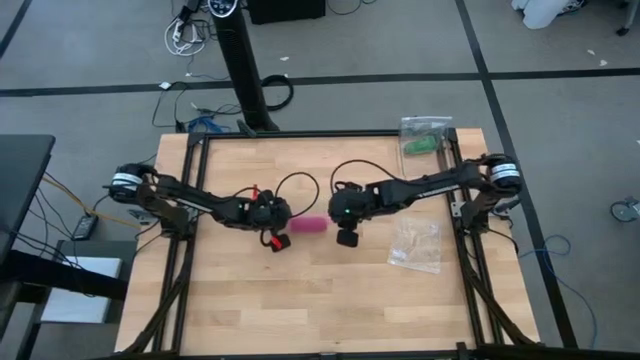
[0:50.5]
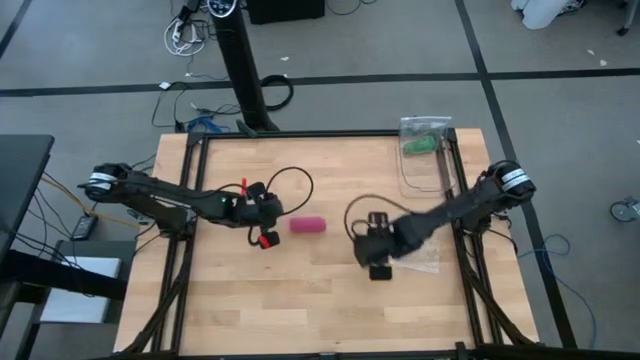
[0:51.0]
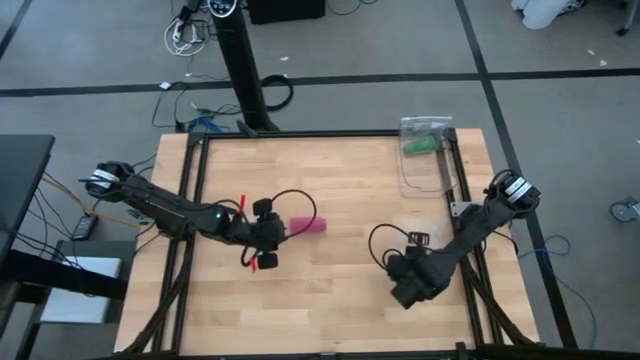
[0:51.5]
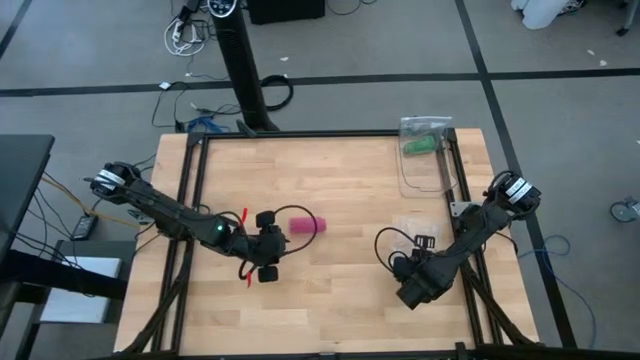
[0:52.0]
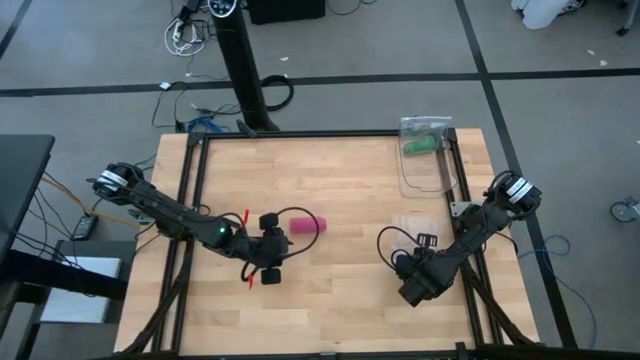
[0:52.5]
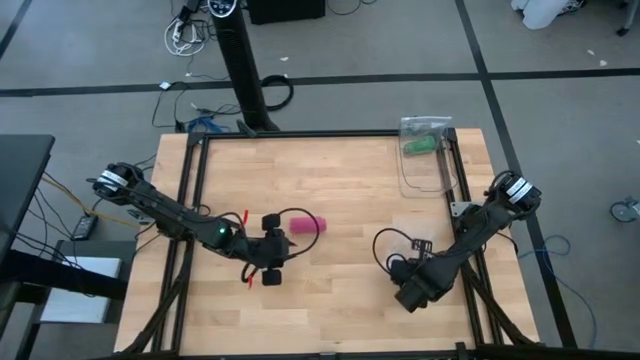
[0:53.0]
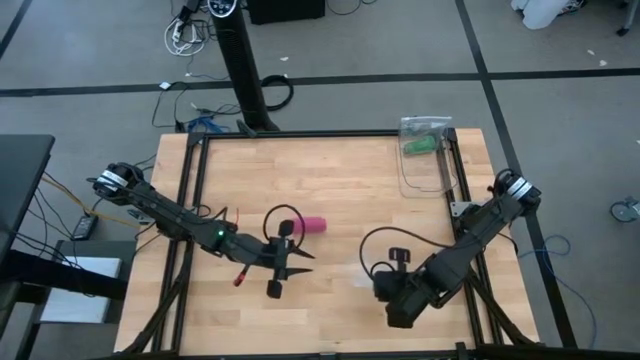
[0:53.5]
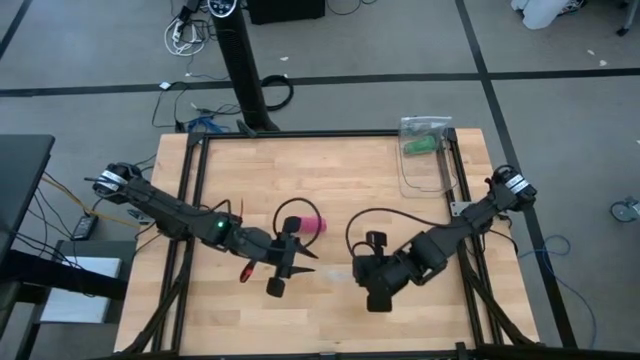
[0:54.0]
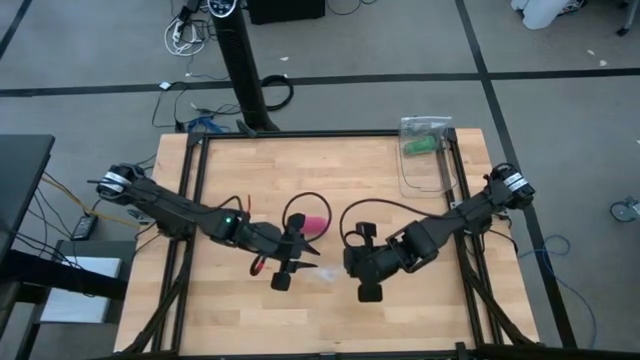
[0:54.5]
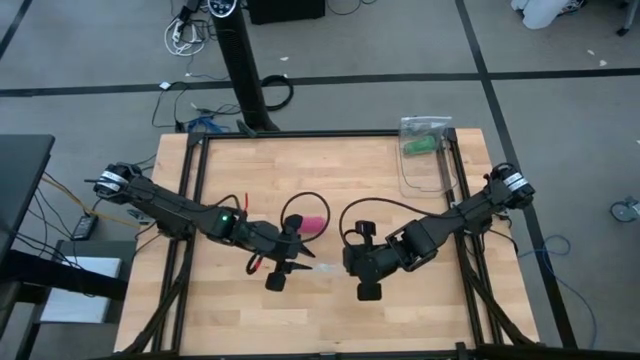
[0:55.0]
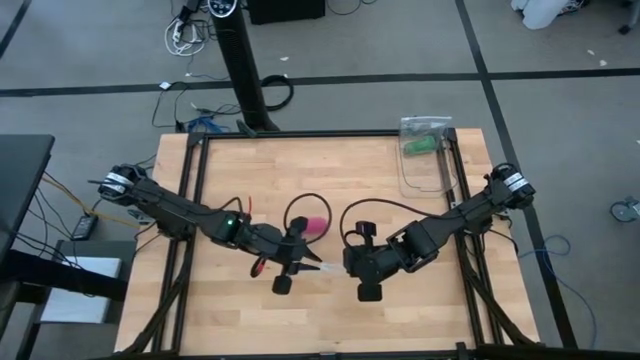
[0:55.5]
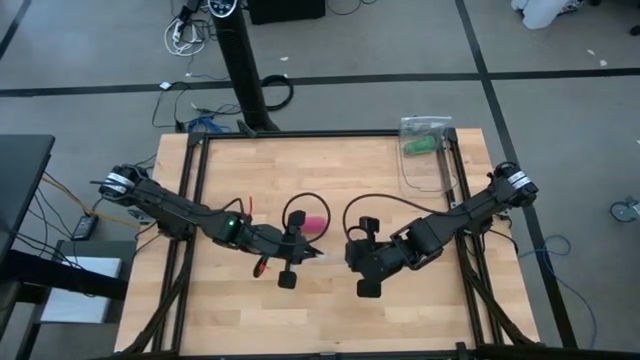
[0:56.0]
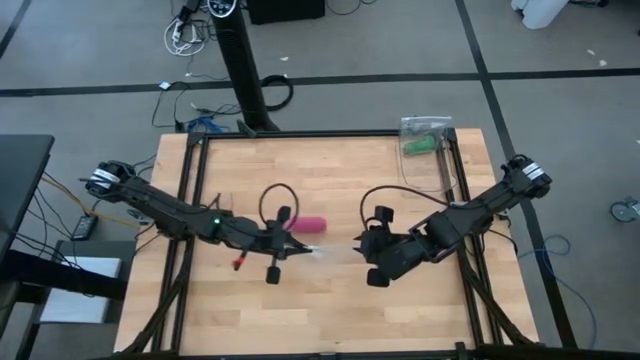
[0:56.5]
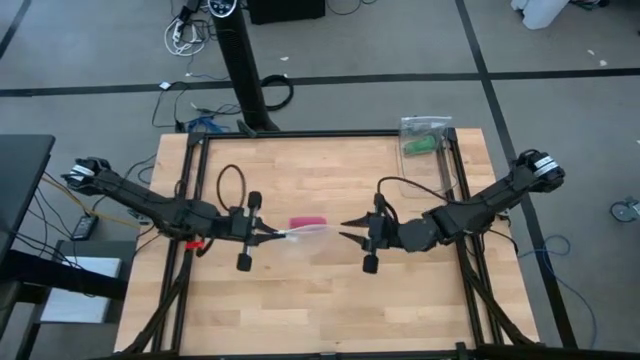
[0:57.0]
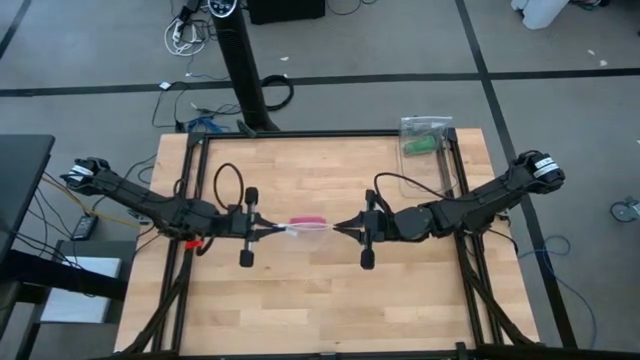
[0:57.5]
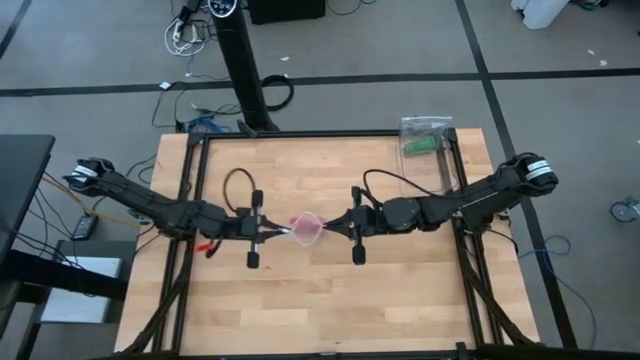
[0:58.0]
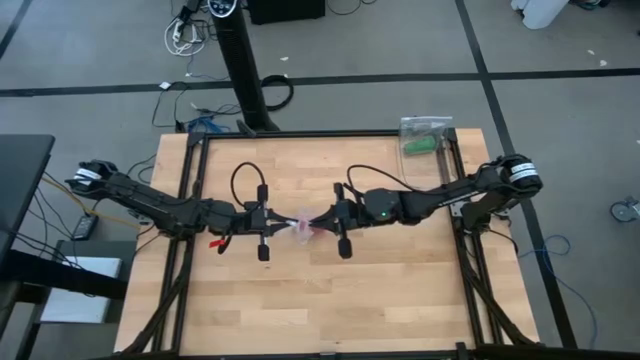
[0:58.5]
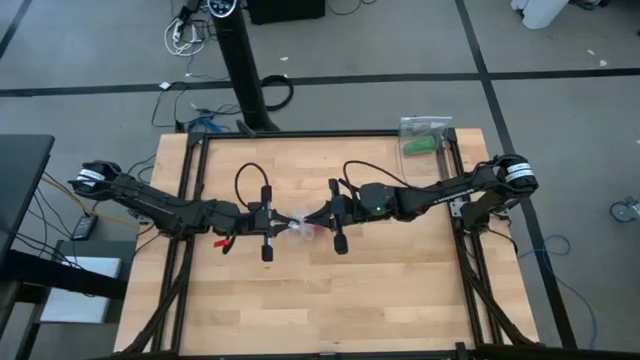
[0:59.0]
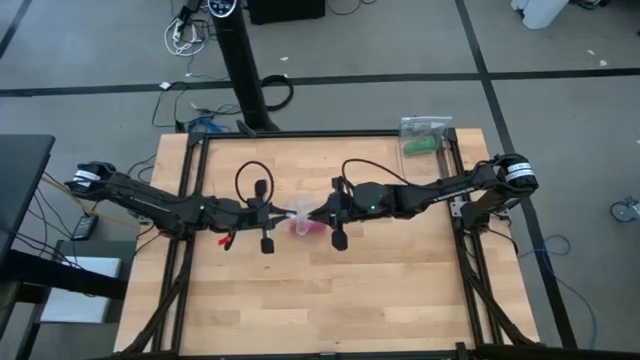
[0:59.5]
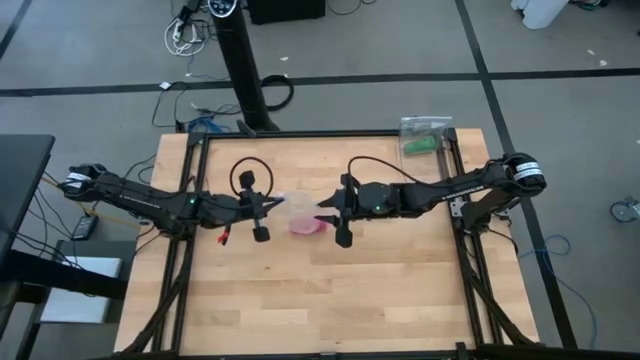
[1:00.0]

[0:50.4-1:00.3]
Task: Roll bandage
Prepare the transparent zip bag

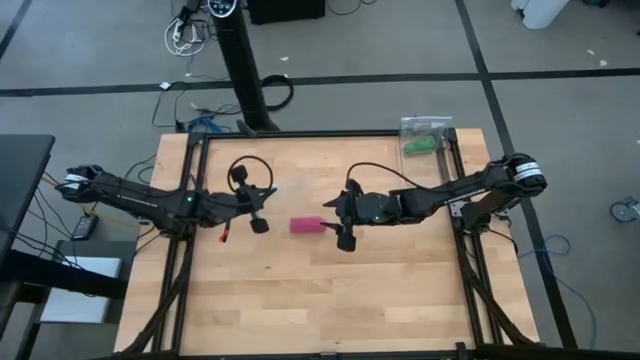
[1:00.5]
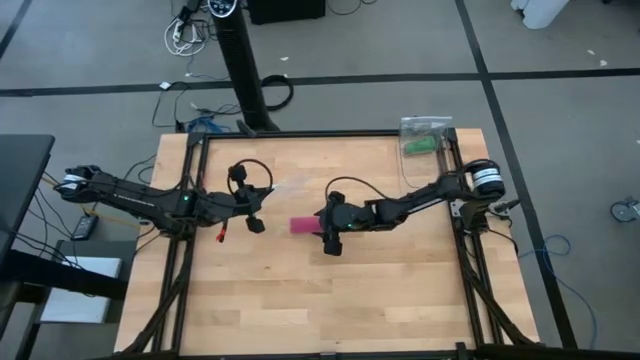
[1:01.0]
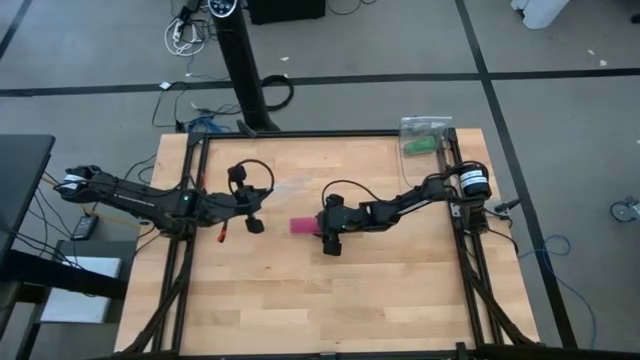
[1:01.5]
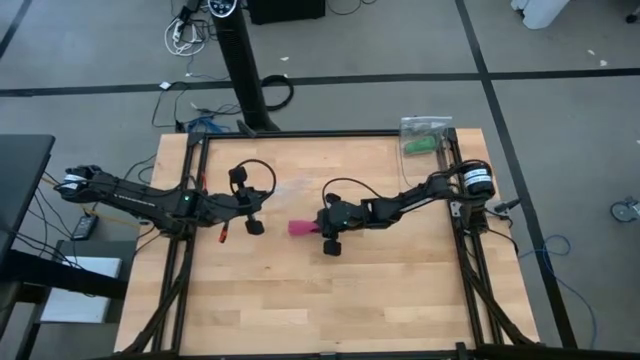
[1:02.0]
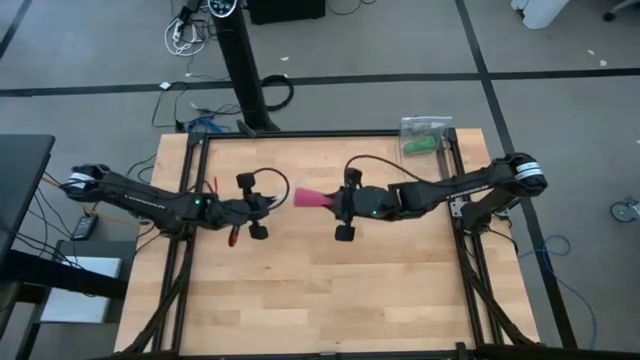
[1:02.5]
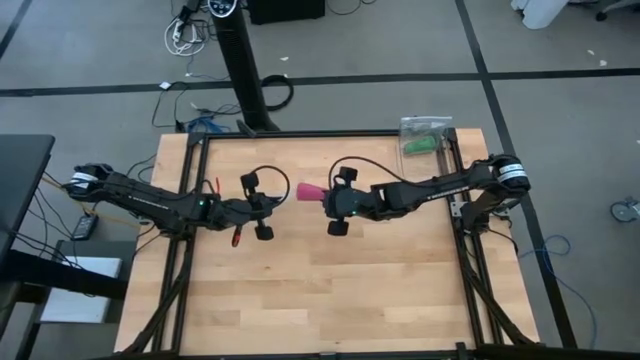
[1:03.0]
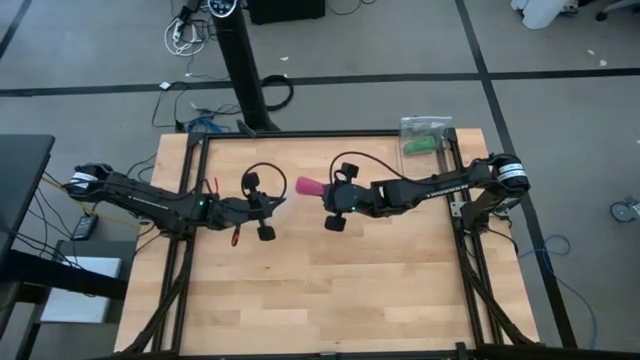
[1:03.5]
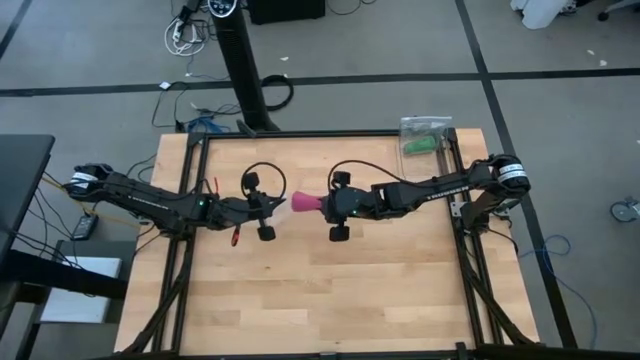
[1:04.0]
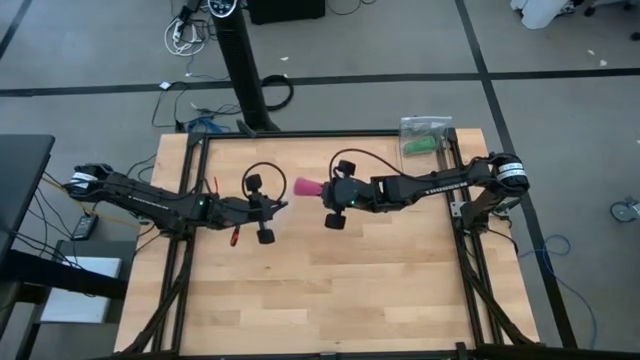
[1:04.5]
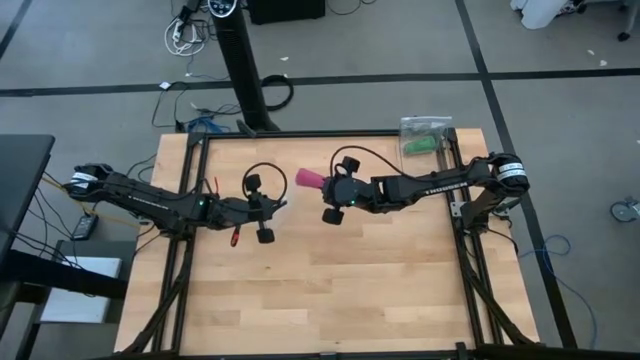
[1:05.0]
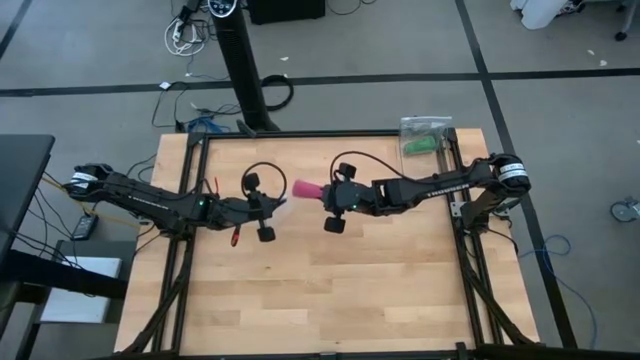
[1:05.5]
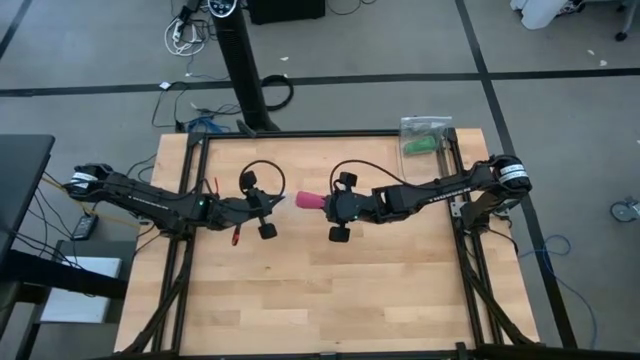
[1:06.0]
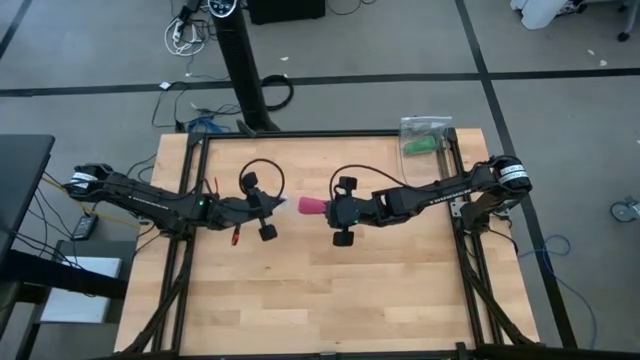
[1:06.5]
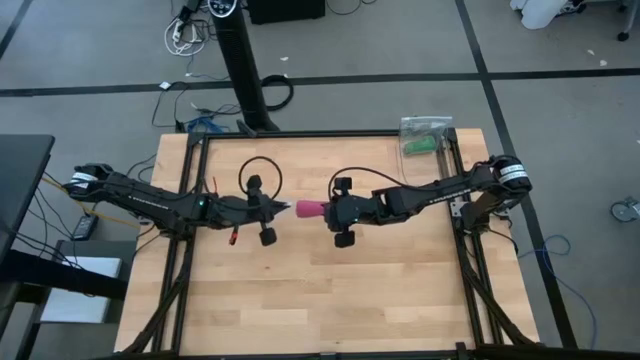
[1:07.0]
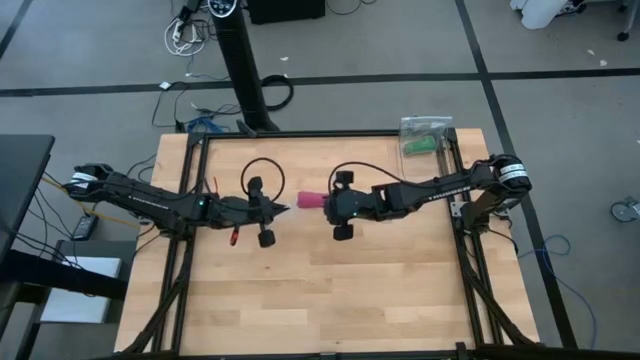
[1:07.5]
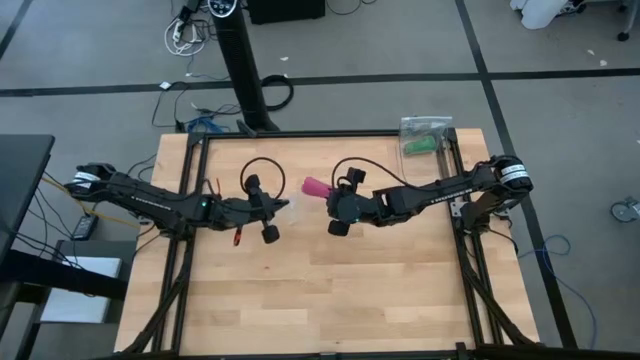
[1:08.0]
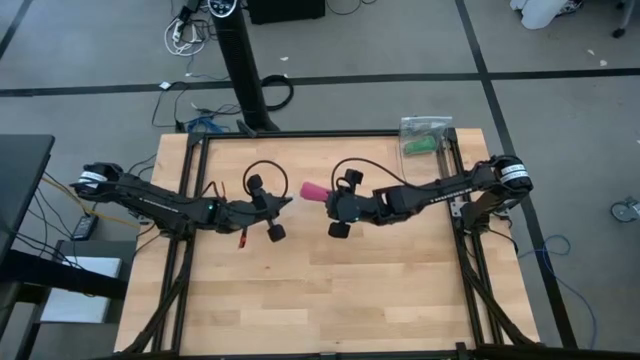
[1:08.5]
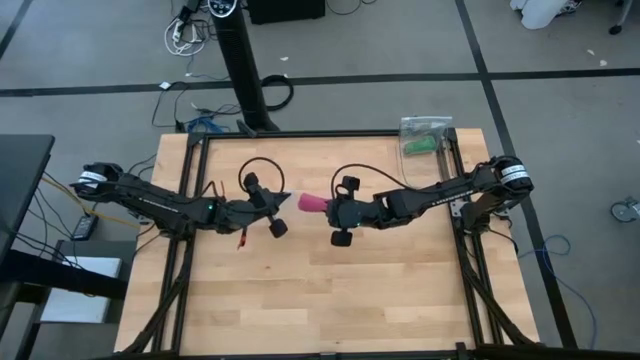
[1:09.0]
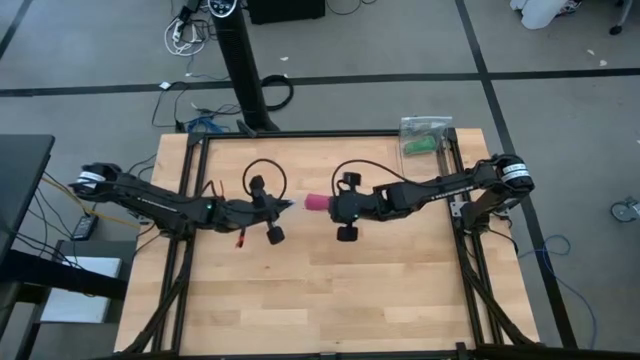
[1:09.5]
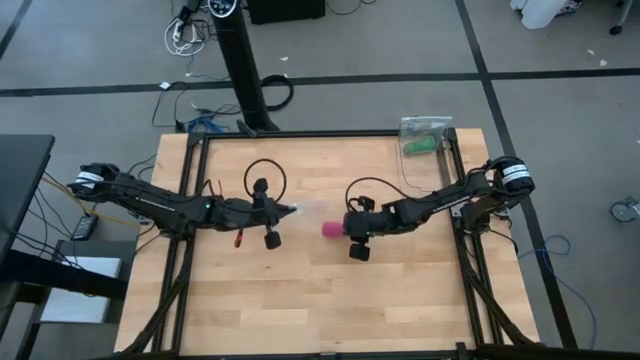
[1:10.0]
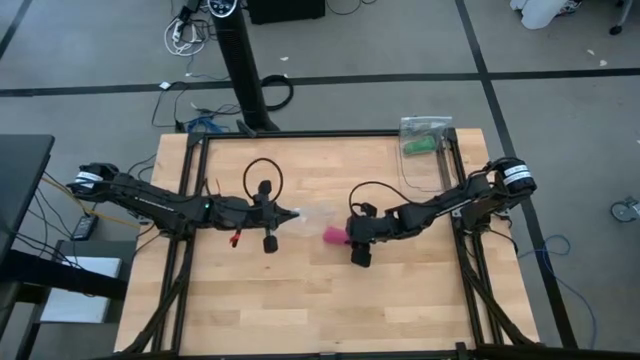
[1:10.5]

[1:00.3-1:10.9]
Put the pink bandage into the transparent zip bag
